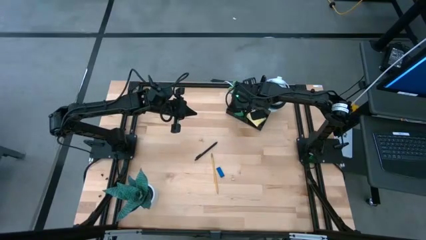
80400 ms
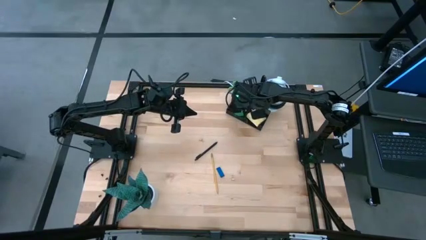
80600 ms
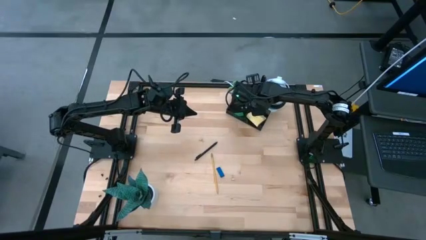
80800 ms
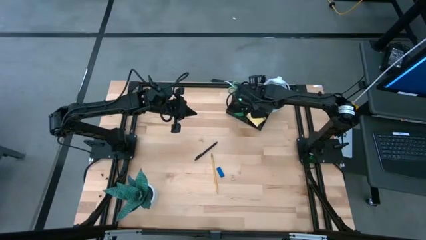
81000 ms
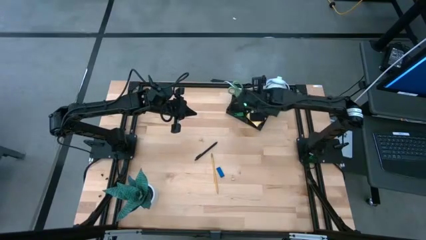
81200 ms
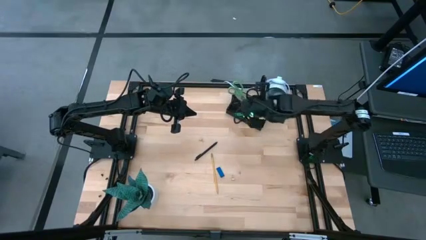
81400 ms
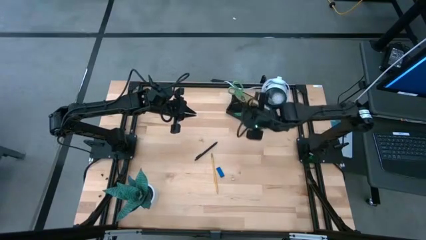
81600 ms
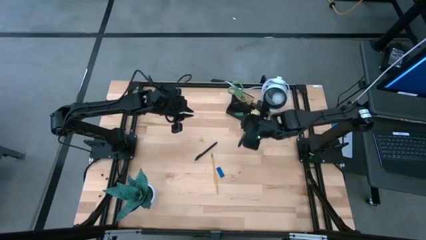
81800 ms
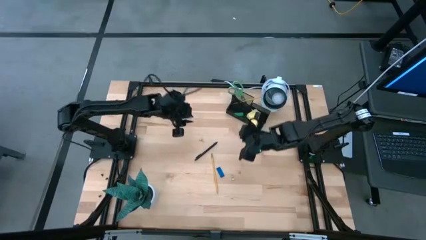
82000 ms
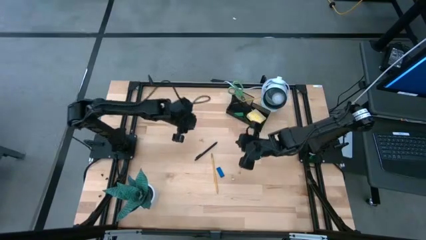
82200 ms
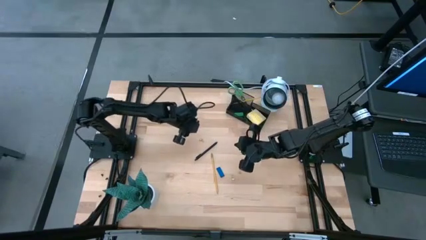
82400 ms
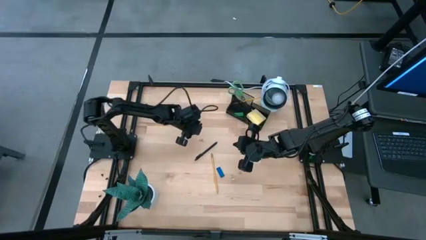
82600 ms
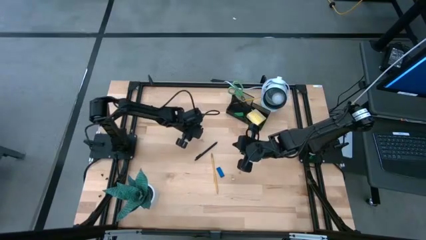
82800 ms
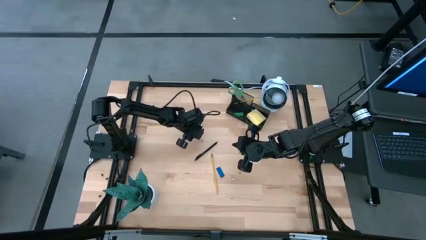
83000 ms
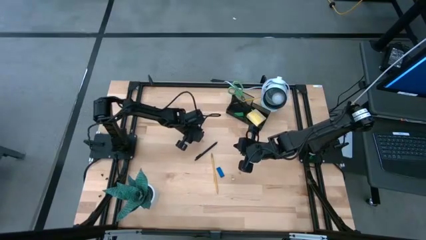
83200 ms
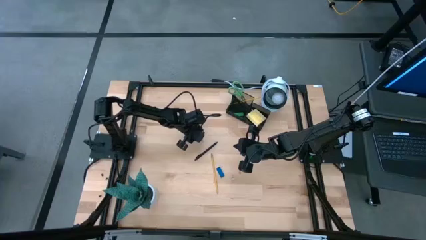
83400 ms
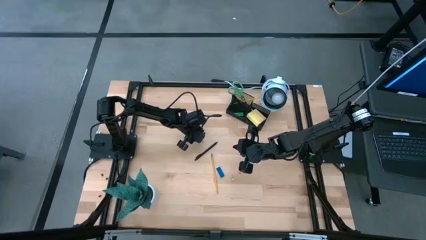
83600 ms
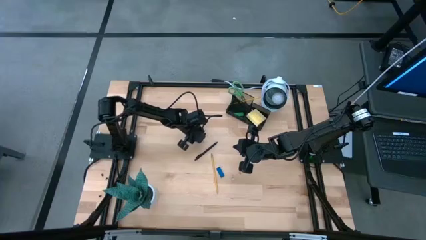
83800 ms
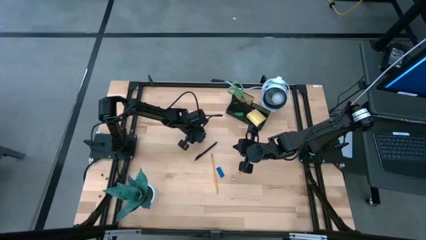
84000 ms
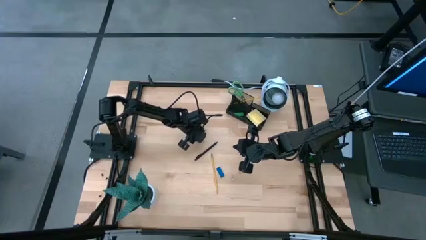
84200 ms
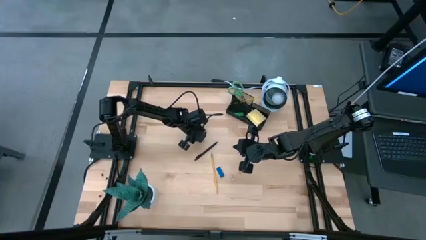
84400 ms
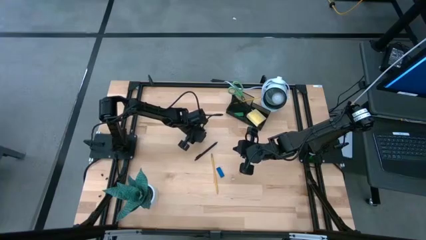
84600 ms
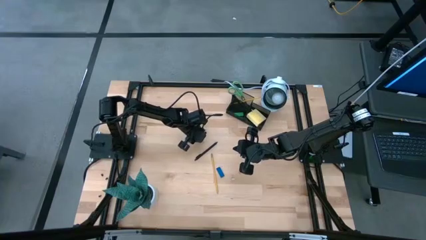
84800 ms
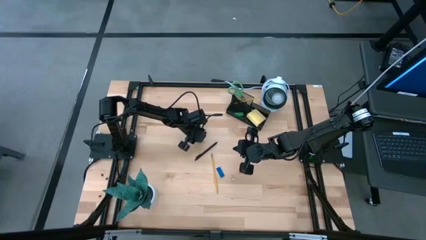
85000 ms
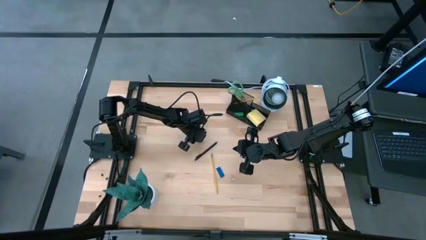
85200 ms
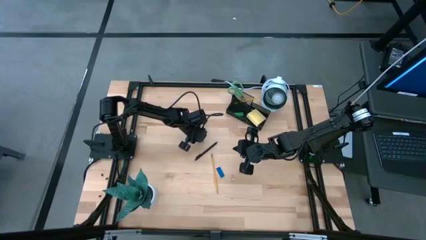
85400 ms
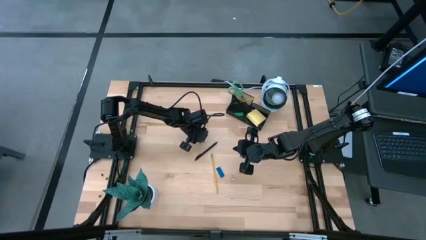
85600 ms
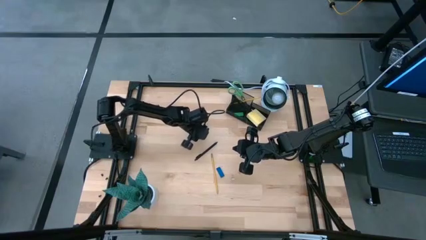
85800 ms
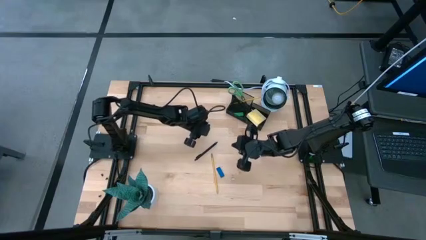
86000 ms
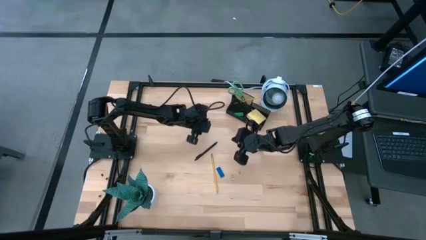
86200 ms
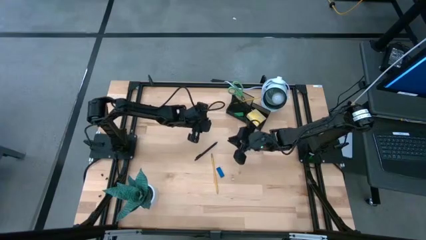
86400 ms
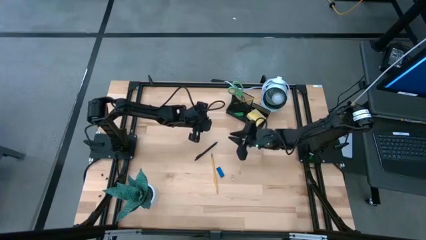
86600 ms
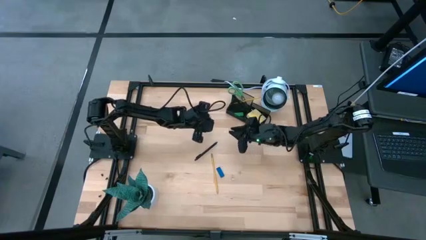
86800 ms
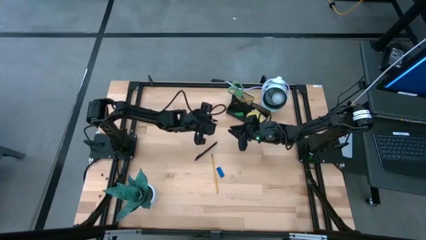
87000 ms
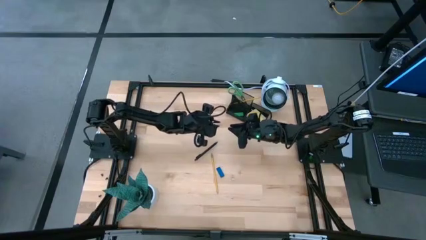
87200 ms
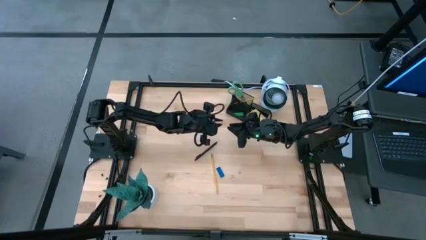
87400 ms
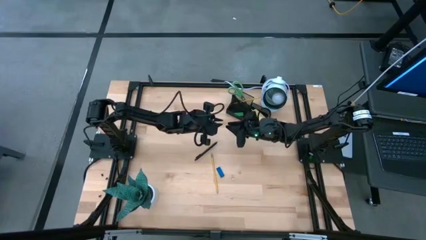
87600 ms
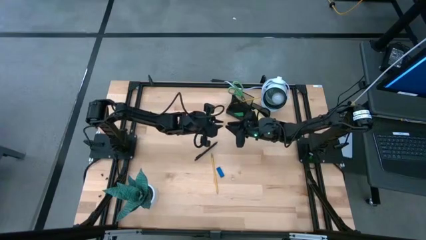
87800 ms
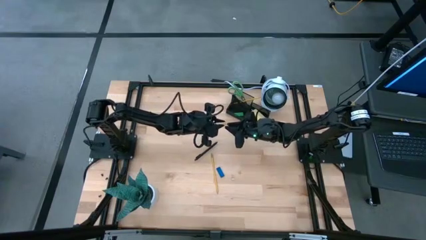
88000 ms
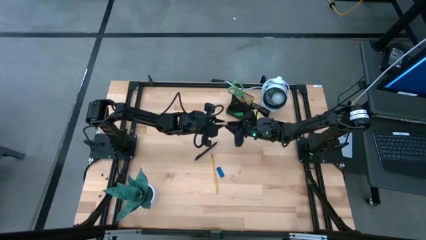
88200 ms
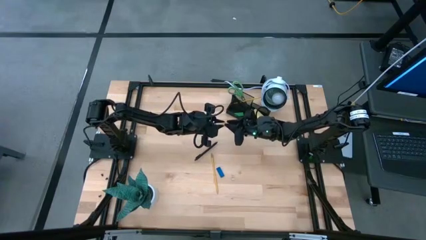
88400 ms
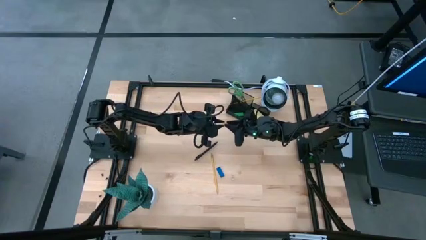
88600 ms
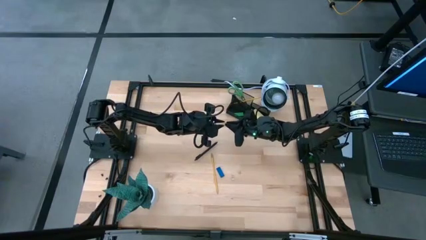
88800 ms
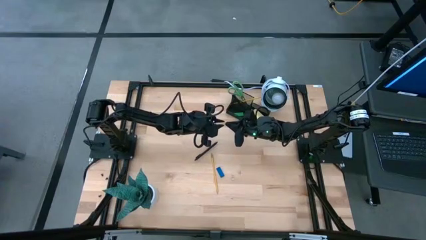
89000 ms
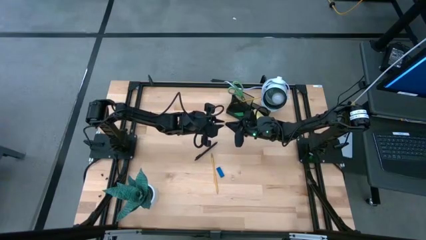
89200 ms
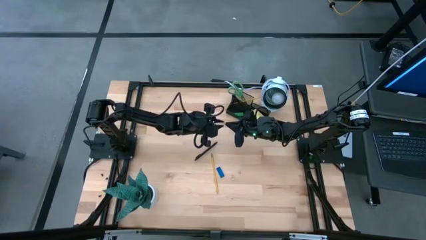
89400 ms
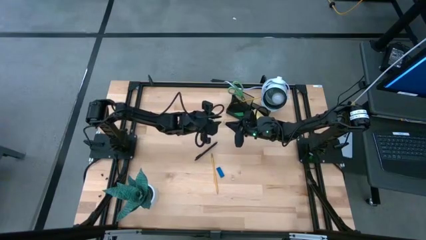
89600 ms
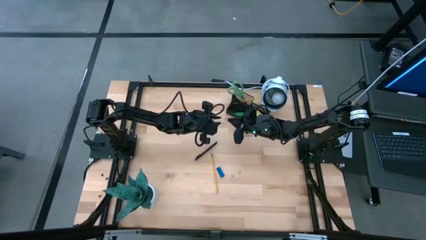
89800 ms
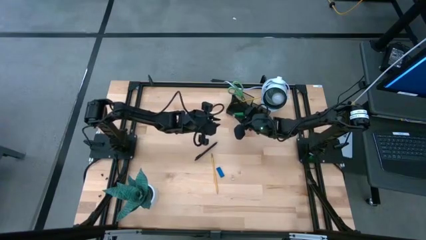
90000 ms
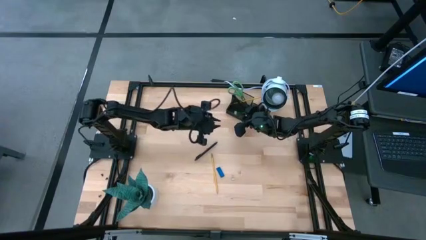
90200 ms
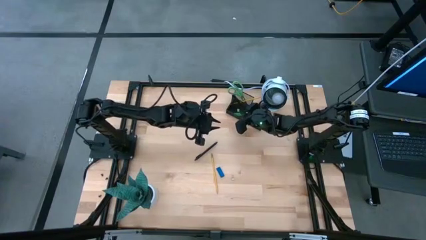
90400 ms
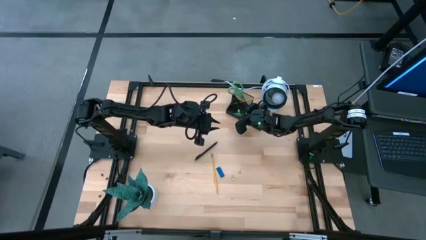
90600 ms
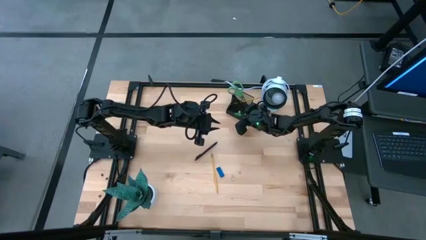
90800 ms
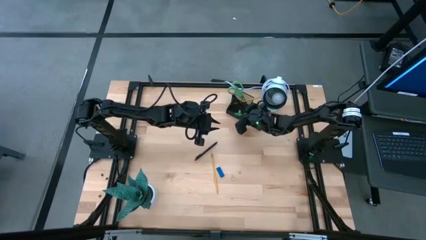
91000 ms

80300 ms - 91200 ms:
Task: Pick and place office supplies into organizer
Put the top binder clip into the metal mesh desk organizer

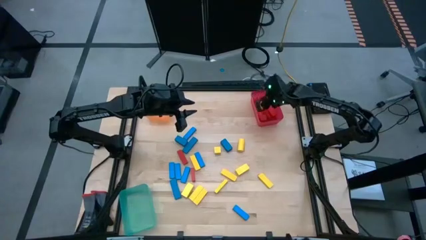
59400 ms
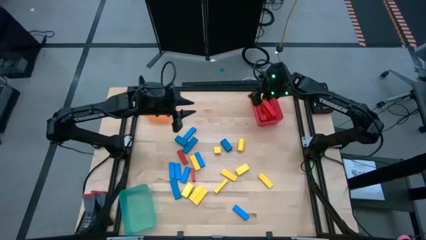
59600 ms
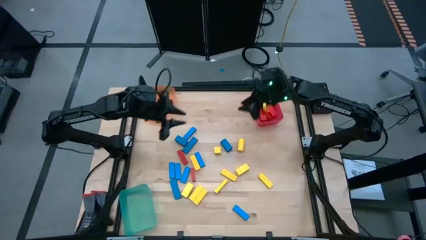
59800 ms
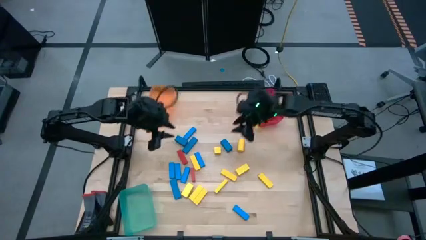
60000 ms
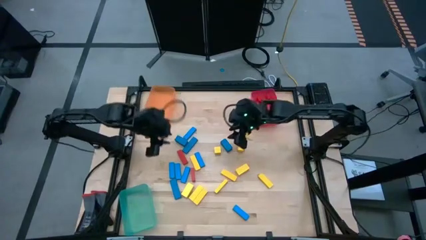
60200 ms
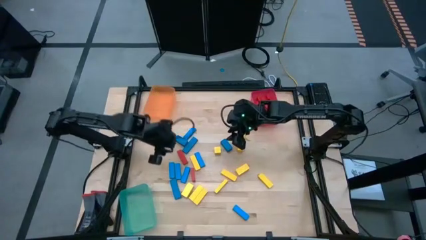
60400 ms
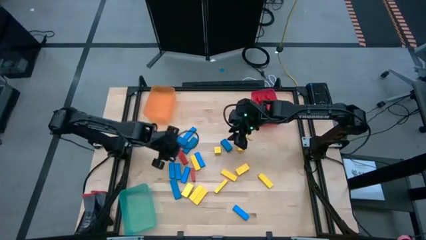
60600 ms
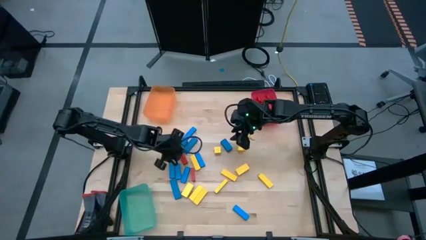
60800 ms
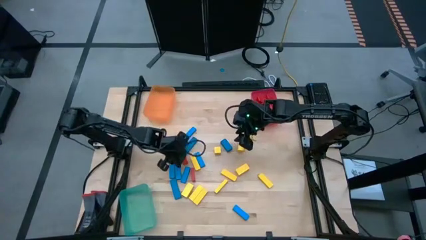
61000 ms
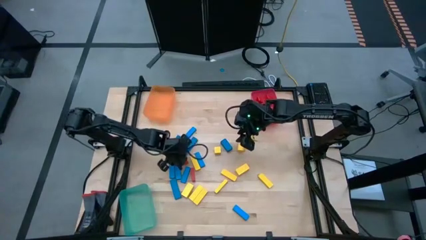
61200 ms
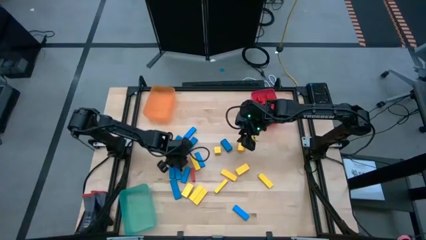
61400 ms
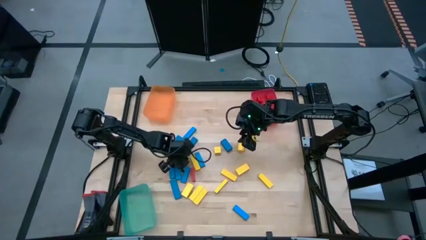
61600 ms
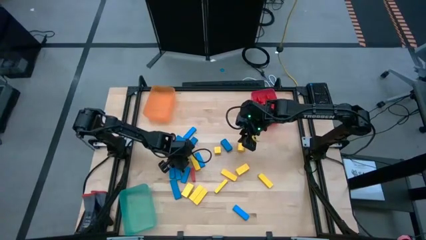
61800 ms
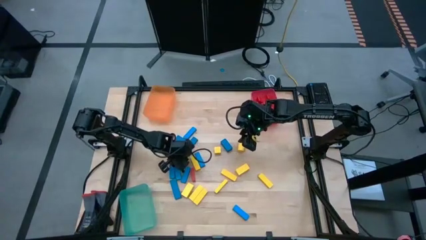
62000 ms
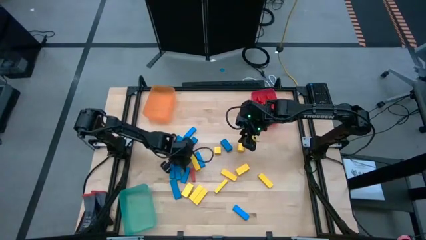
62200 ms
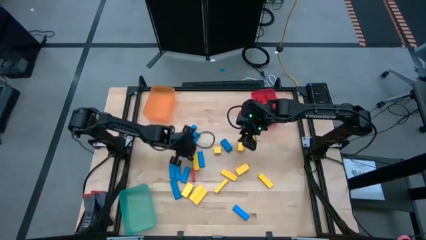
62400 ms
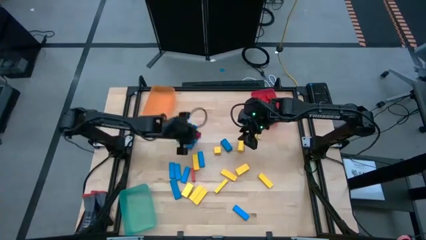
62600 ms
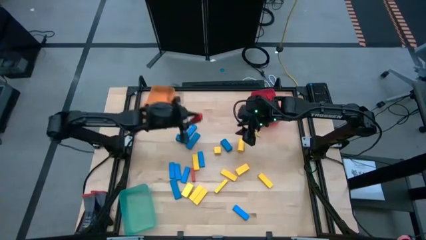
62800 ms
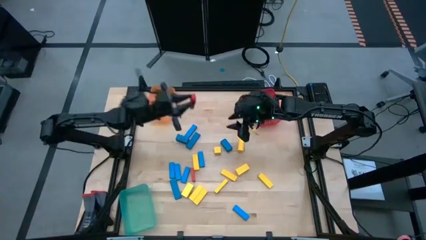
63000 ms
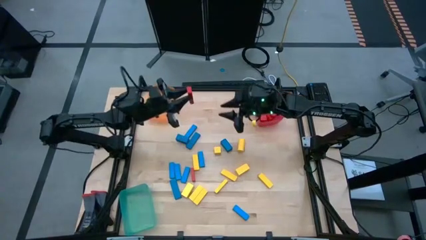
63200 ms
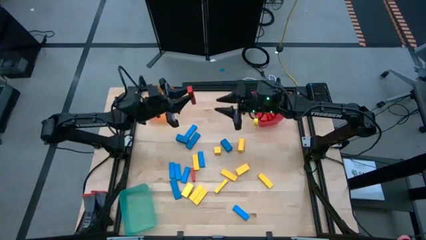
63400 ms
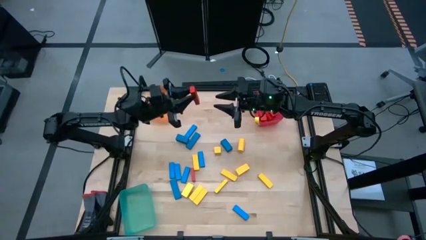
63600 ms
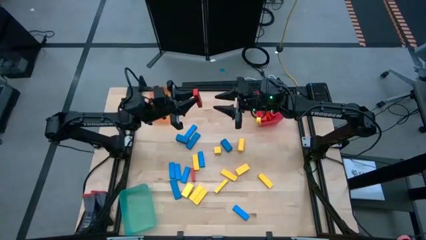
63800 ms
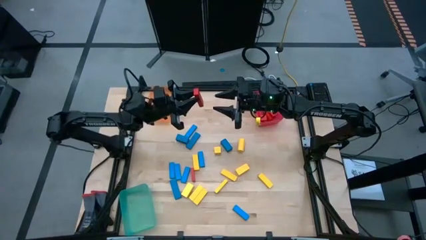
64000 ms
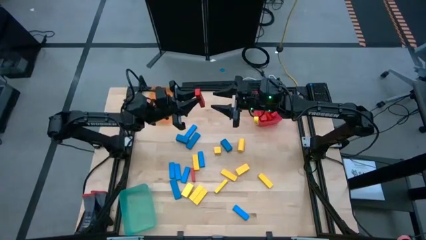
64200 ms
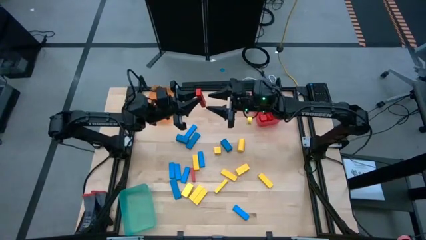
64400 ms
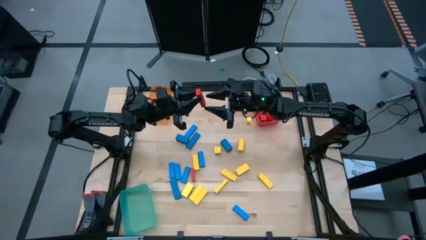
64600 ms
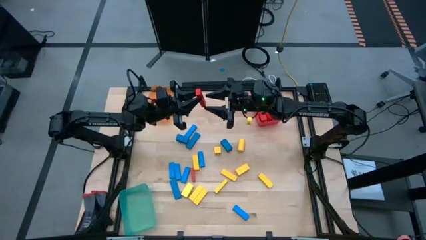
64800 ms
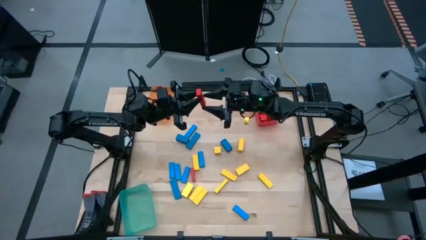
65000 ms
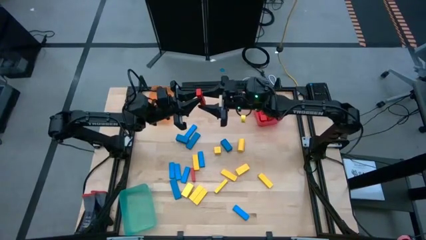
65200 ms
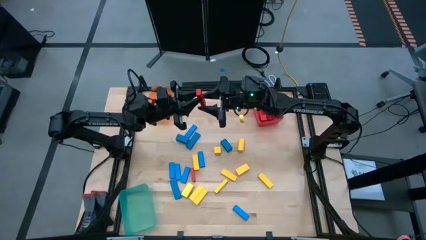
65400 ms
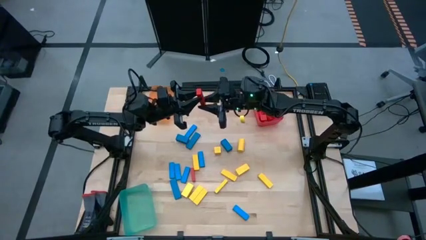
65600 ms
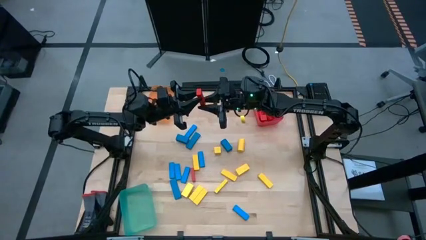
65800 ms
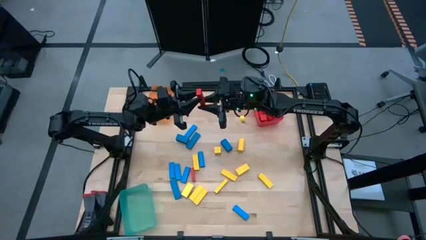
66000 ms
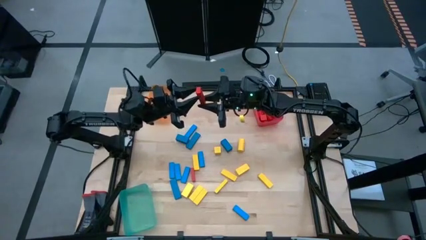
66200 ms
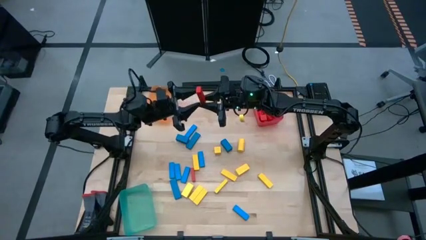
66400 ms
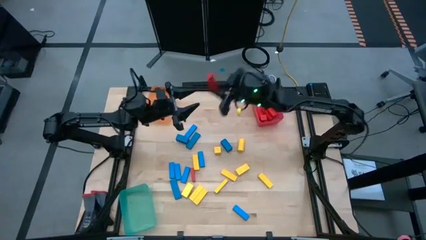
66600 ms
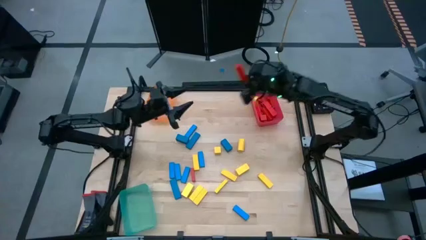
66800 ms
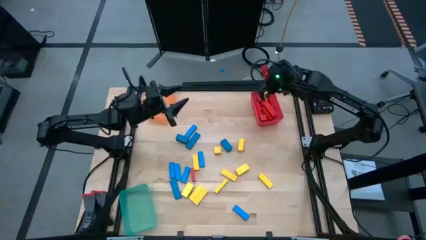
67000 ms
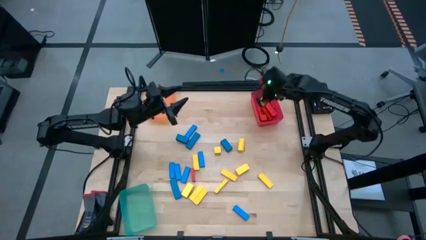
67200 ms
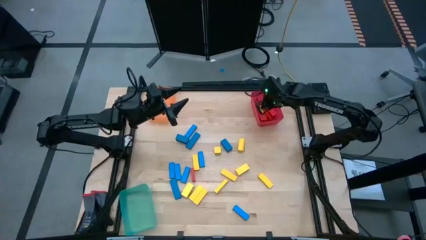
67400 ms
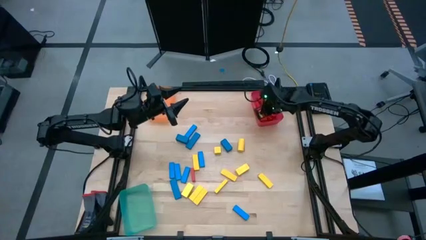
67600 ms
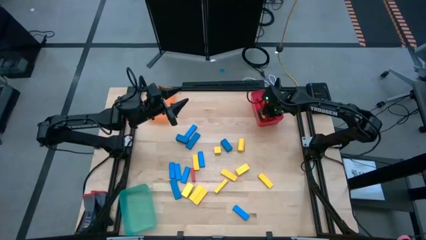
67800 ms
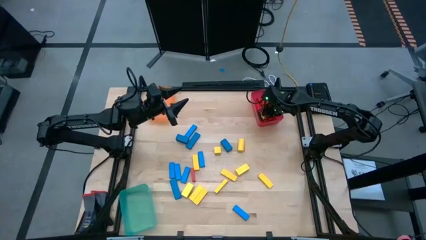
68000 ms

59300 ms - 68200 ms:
Task: Sort blocks
Put the red block into the red transparent bin
